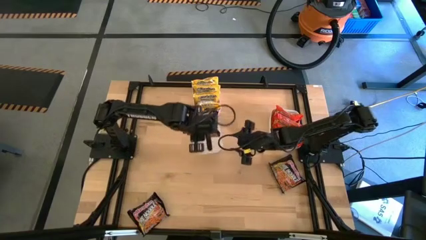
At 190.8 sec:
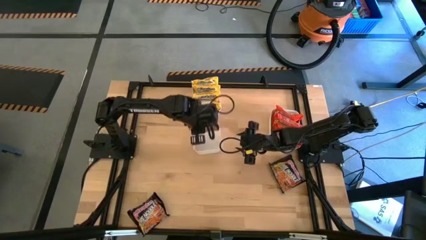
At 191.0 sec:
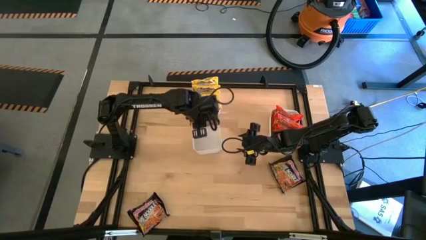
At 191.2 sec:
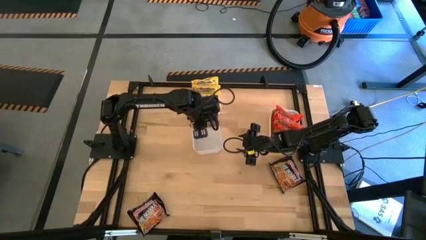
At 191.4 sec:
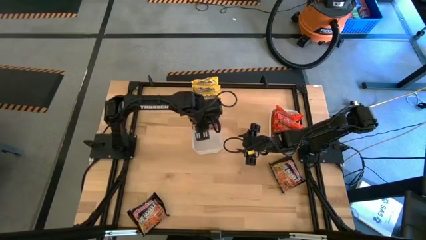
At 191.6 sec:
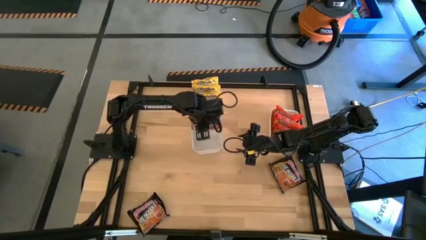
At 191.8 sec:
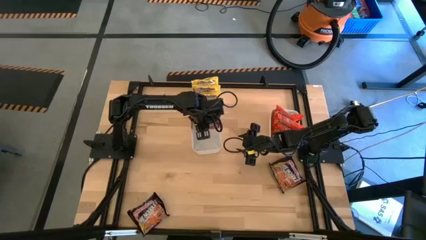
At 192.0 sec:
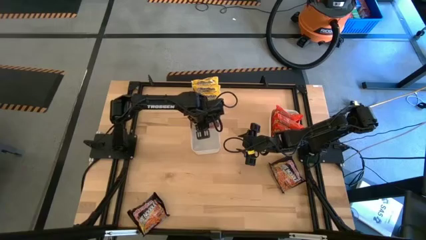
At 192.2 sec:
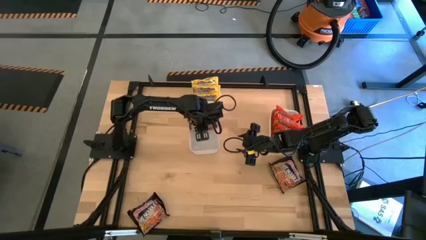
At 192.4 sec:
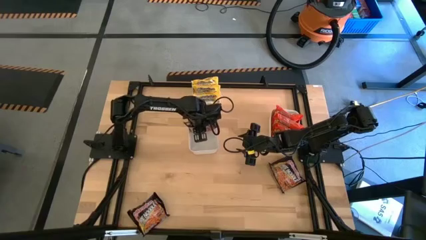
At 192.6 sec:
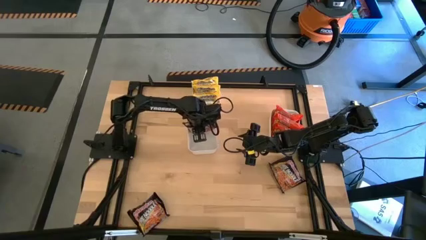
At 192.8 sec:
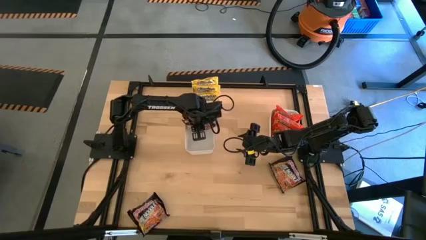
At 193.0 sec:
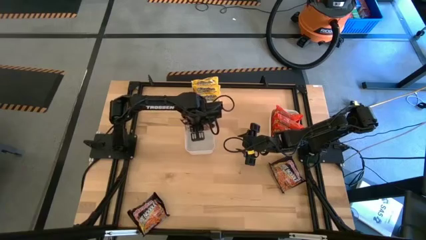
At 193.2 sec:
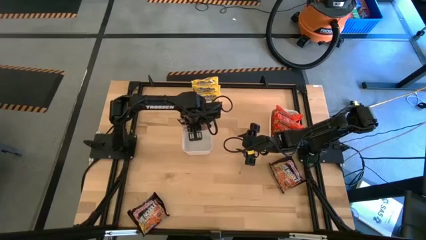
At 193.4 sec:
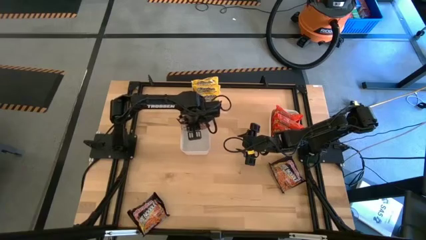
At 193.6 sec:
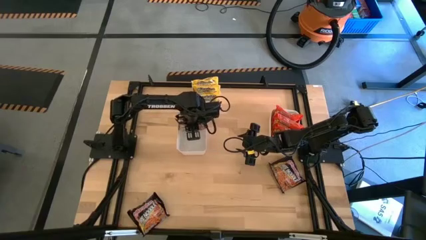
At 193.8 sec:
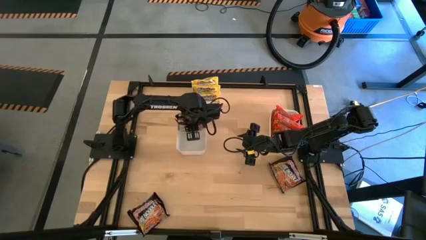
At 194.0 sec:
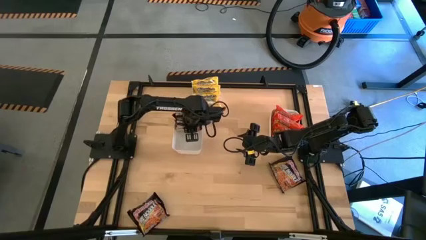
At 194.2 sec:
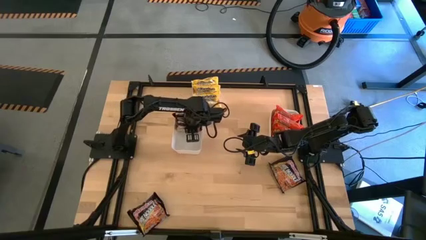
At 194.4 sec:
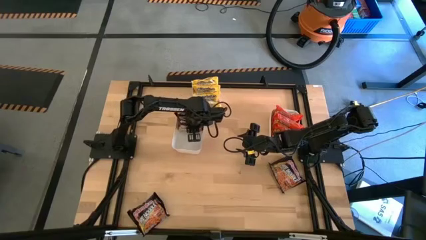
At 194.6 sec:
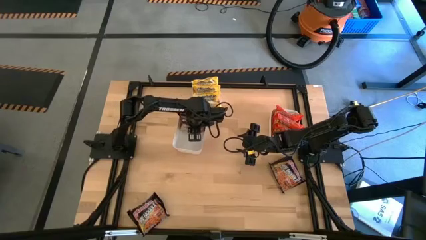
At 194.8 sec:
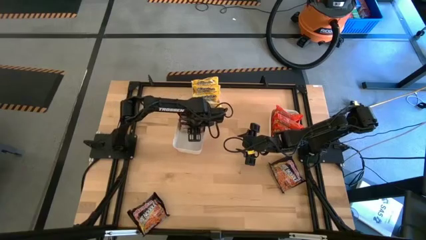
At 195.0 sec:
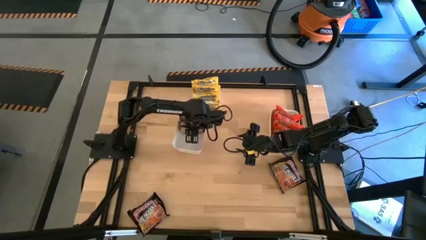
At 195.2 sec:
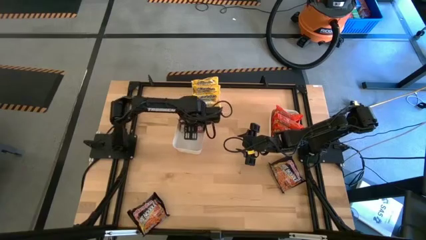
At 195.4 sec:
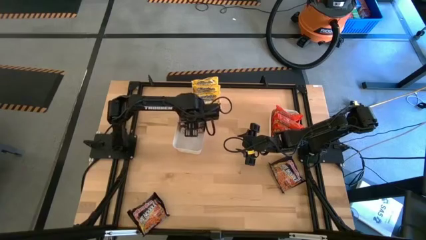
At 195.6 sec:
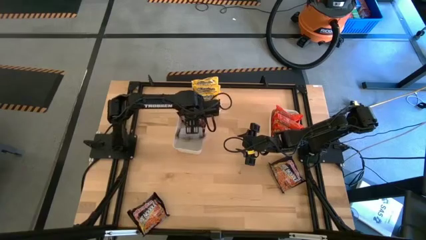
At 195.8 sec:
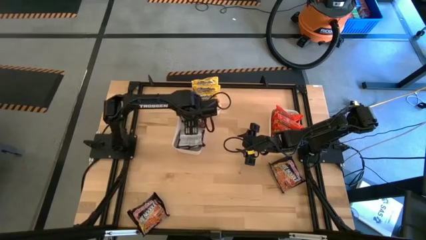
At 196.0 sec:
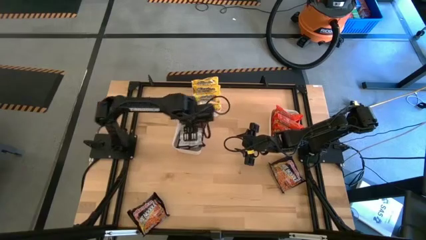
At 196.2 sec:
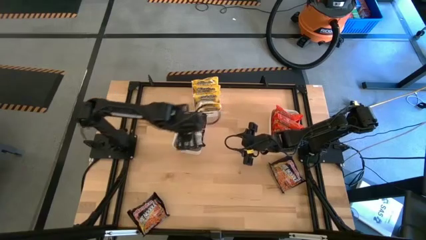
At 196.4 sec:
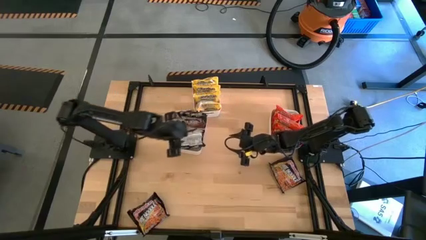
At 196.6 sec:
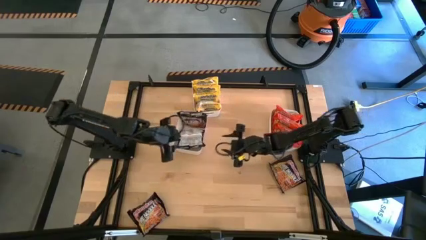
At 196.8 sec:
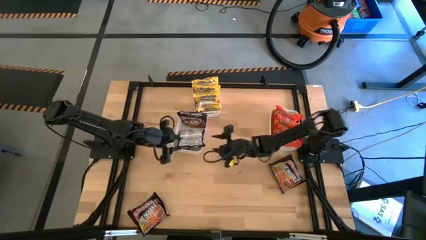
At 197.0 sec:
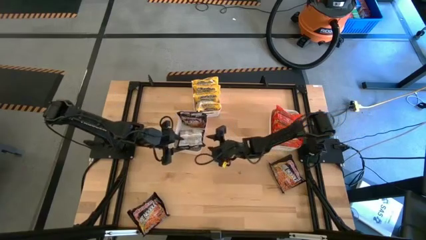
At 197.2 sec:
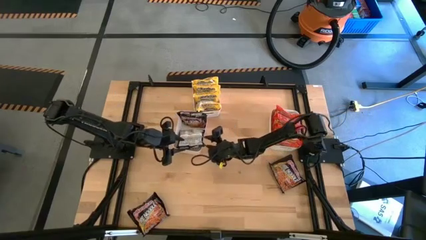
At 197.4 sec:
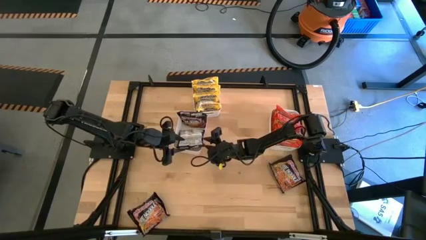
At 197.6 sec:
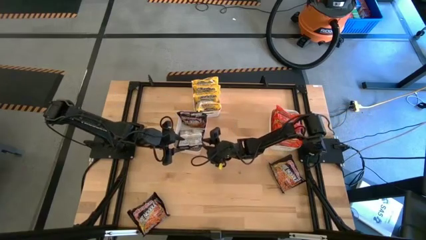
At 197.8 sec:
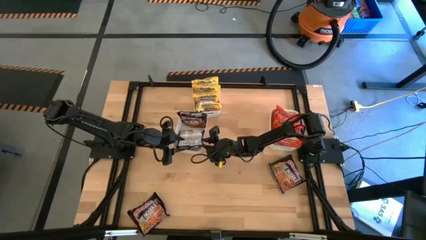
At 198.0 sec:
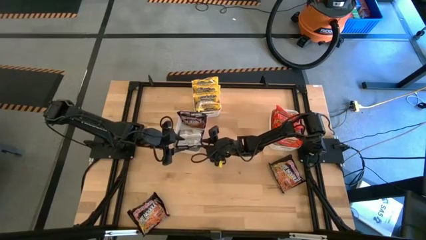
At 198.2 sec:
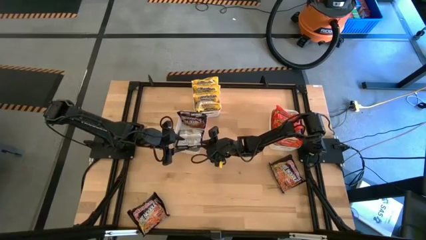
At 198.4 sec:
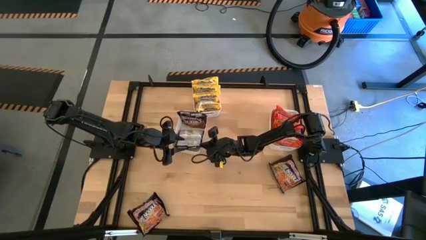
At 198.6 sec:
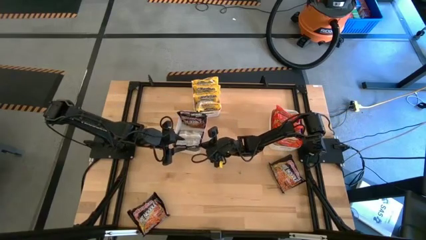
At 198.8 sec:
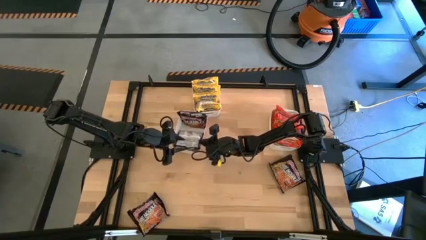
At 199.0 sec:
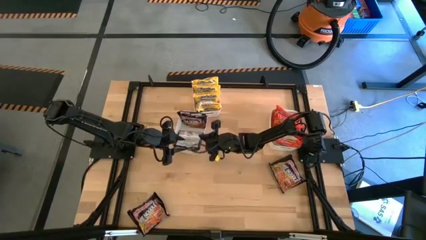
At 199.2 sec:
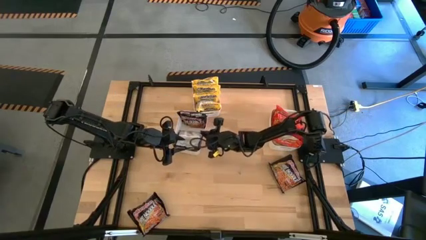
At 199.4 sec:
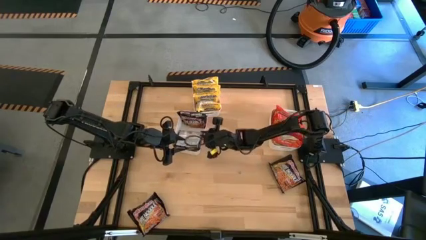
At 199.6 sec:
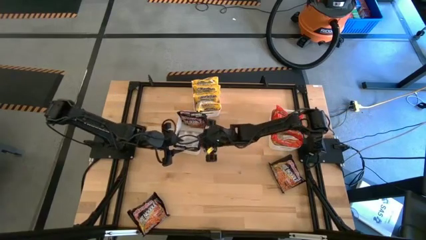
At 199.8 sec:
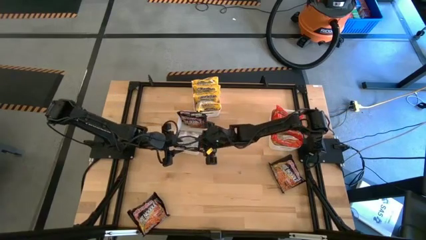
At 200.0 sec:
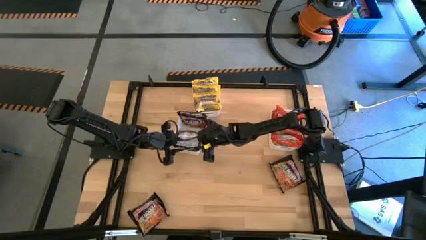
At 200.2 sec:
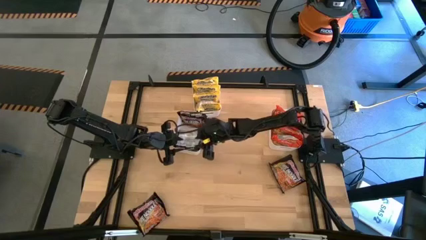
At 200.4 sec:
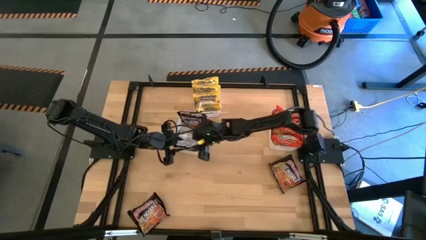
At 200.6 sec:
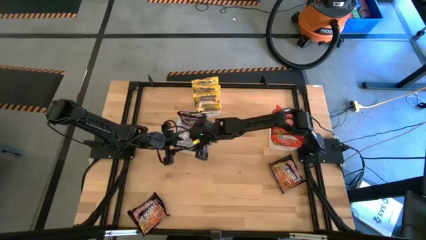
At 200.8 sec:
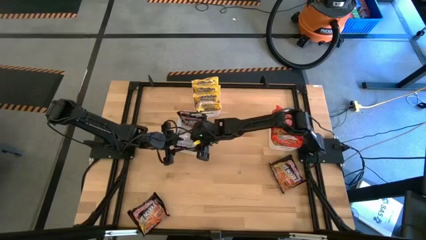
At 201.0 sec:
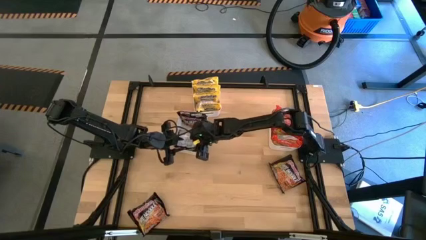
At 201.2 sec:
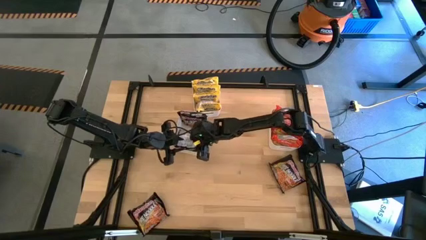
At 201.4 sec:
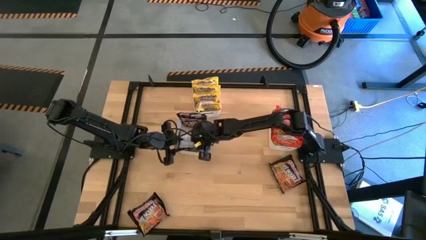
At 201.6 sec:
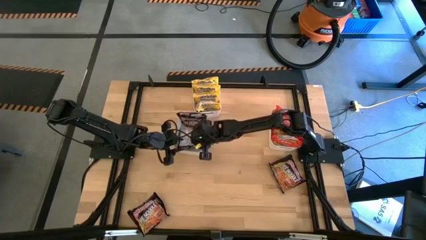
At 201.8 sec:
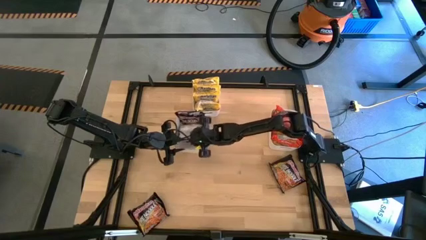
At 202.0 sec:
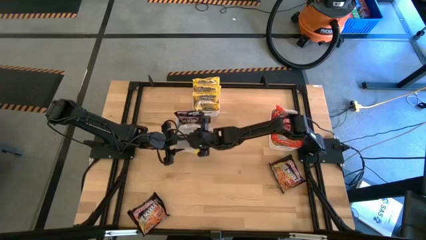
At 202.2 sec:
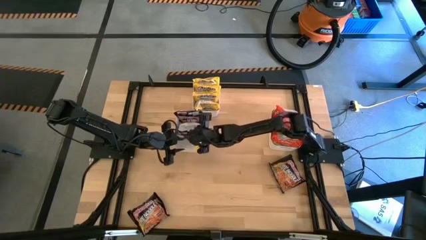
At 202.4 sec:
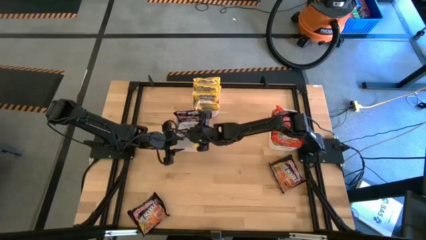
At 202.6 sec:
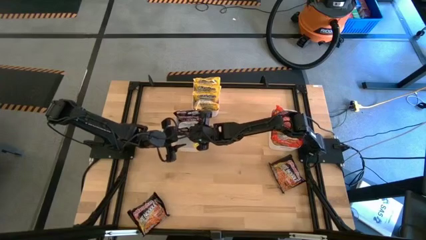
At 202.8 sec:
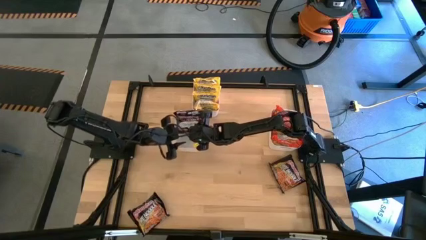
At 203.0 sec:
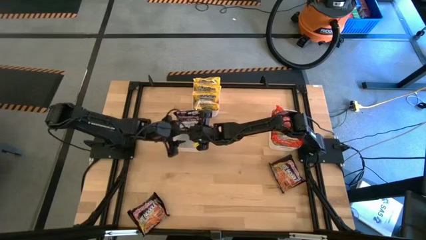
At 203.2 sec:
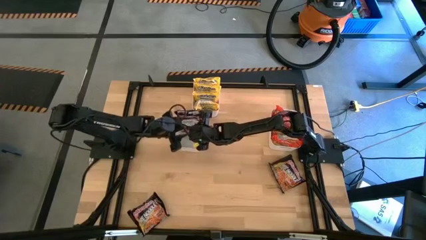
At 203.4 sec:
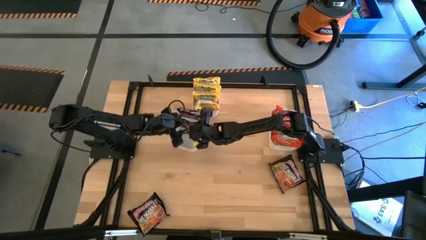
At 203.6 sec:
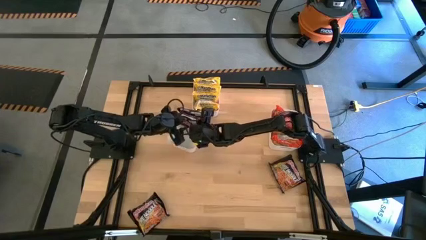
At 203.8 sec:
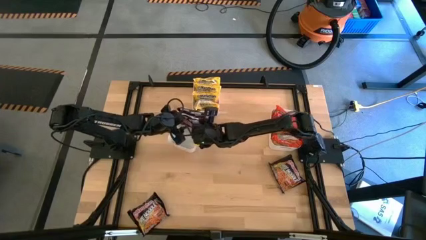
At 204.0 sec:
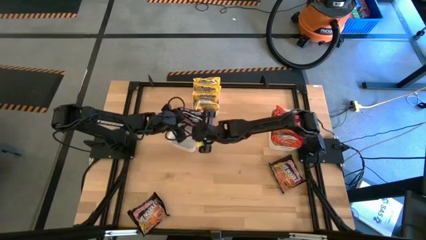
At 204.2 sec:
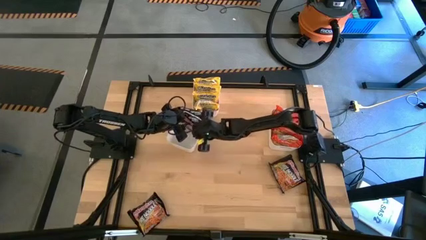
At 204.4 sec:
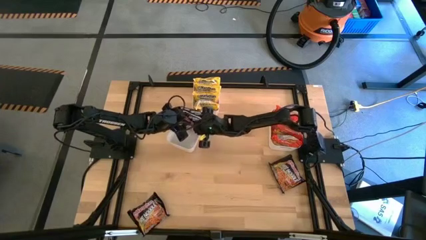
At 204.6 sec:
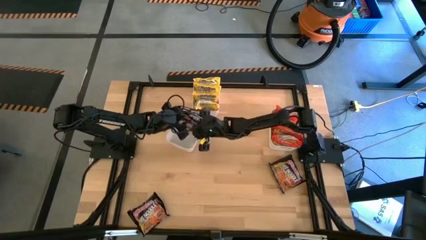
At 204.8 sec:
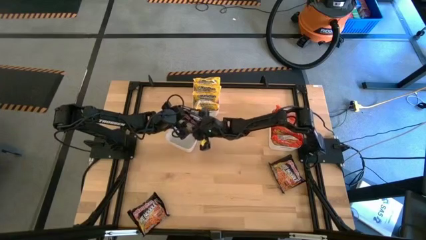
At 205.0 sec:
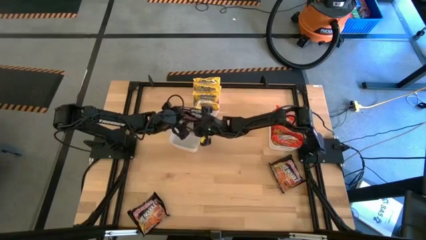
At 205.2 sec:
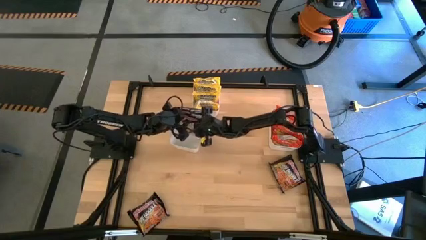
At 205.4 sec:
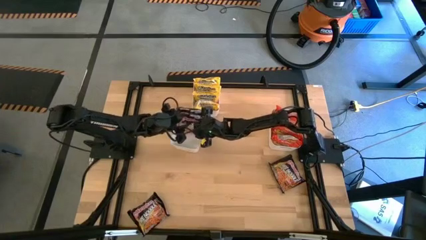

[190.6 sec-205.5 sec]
Task: Sort Maruchan noodles
Put the black noodle pack into the bottom left white bin
